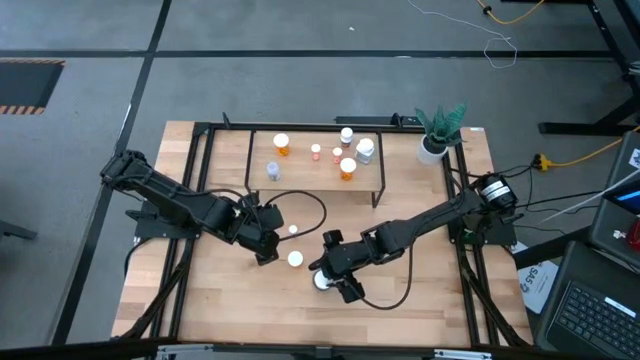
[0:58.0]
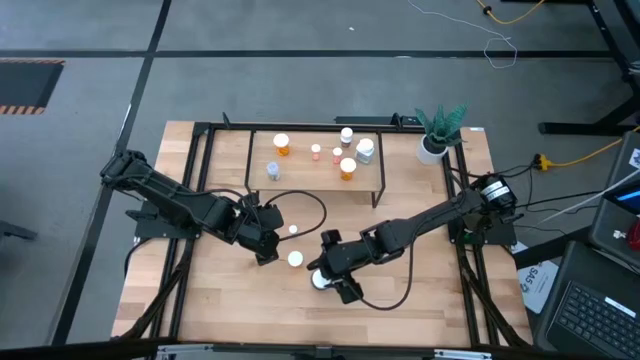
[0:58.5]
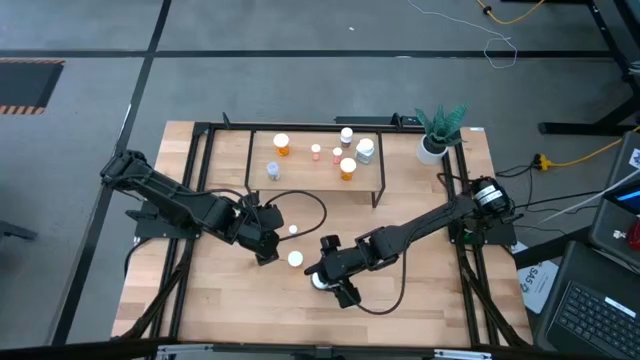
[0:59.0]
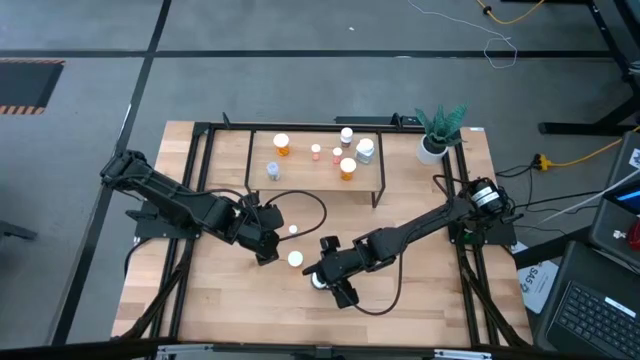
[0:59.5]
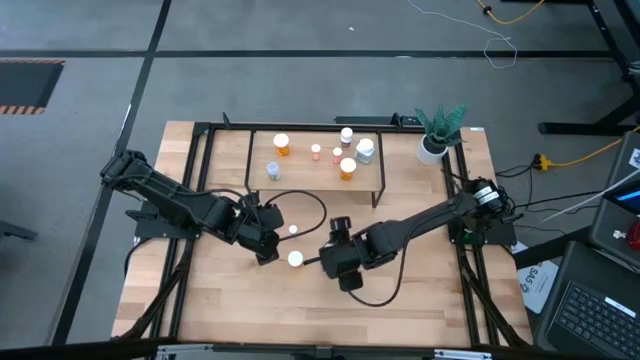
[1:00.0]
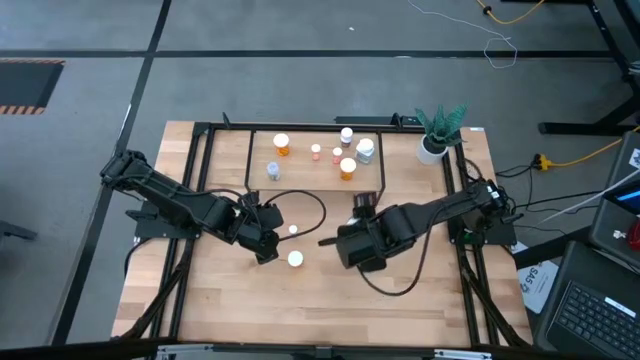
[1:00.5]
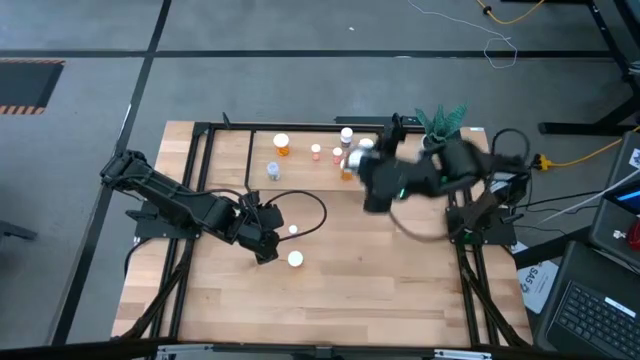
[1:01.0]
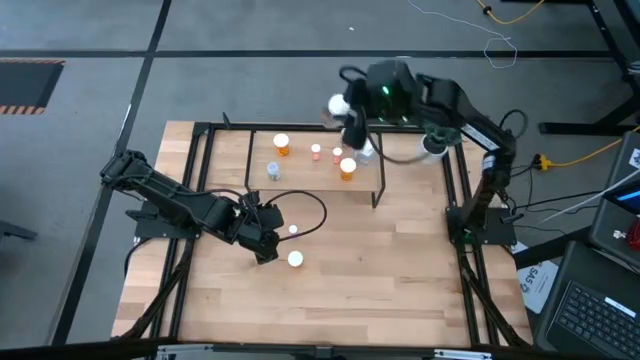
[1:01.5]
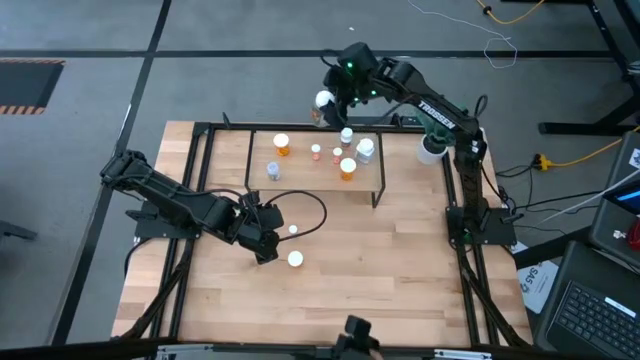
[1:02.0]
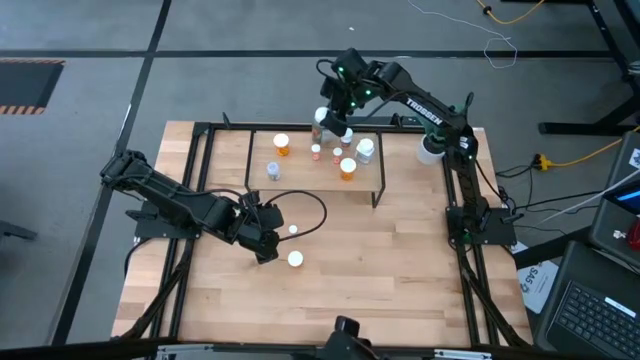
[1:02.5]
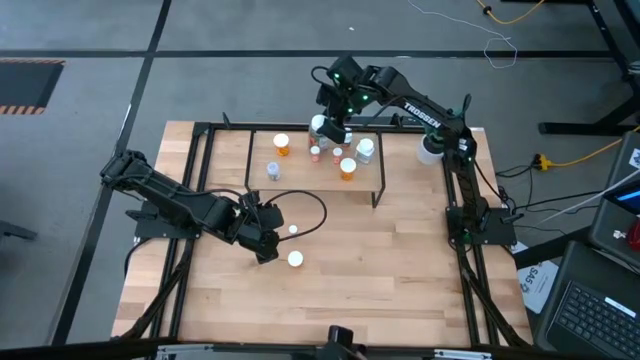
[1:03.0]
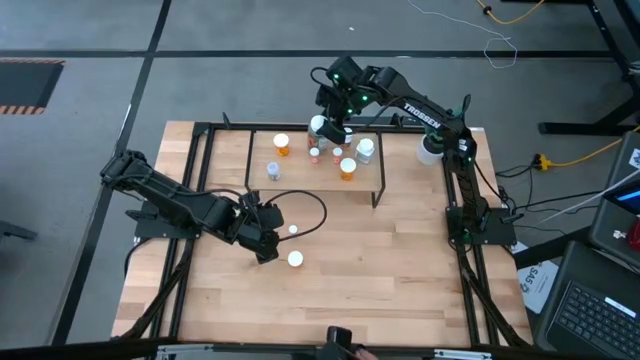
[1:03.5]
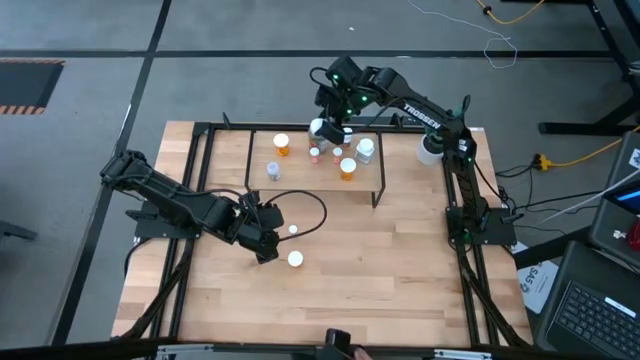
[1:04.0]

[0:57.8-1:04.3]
Task: Pick and place medicine bottles onto shelf by color
Put the green pill bottle on the shelf

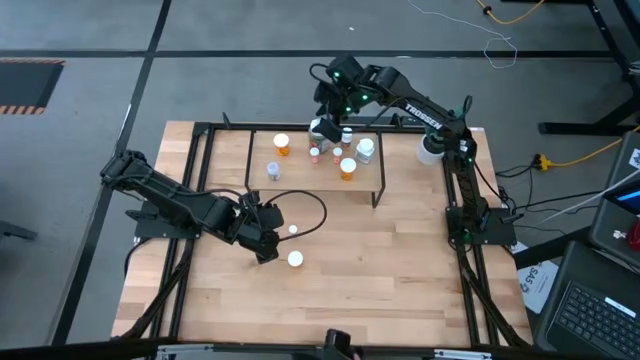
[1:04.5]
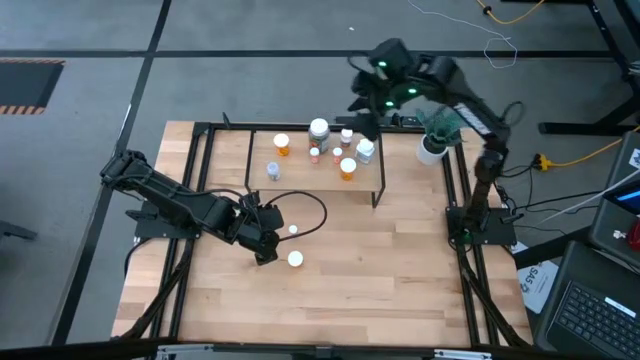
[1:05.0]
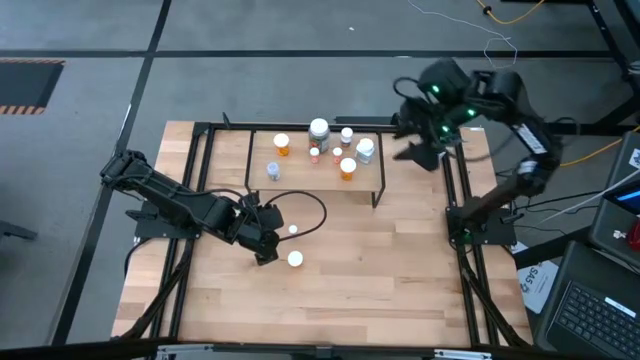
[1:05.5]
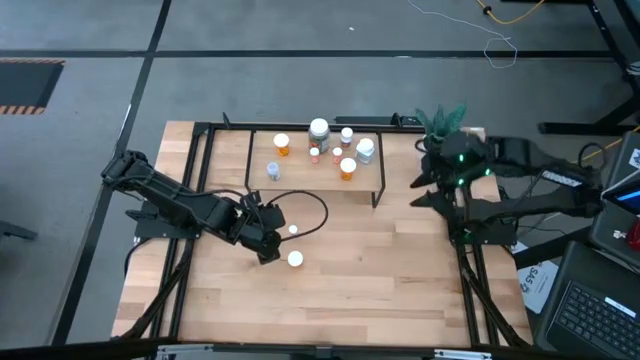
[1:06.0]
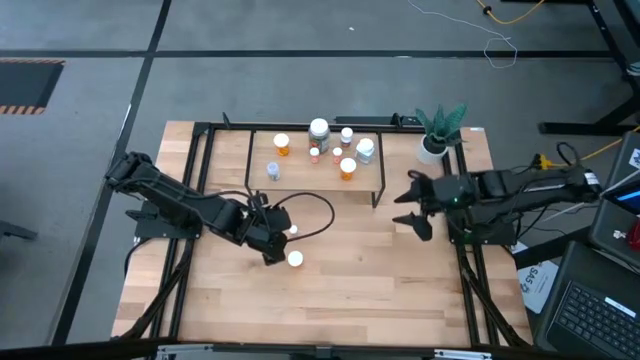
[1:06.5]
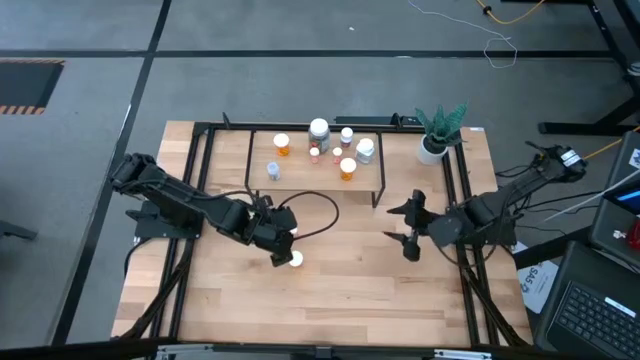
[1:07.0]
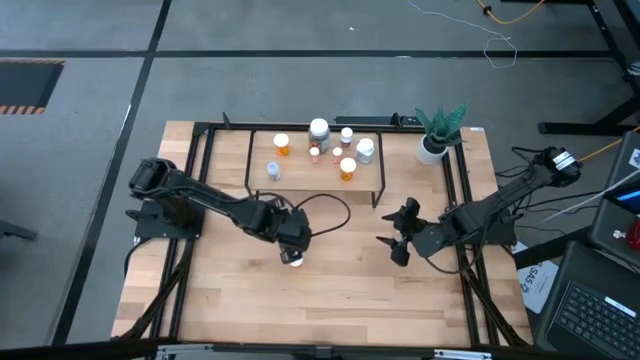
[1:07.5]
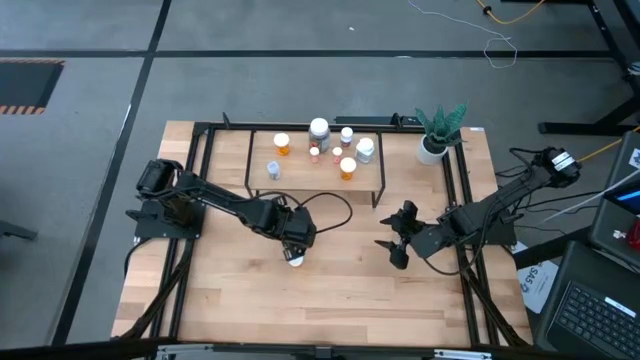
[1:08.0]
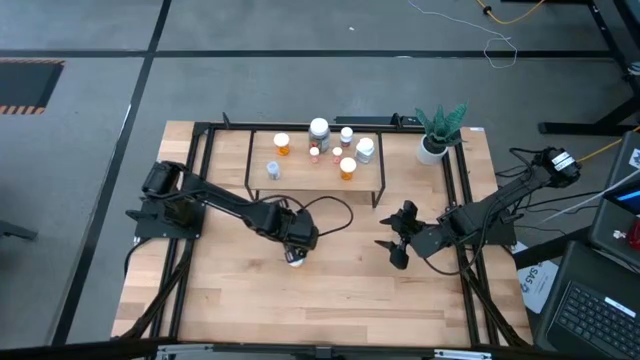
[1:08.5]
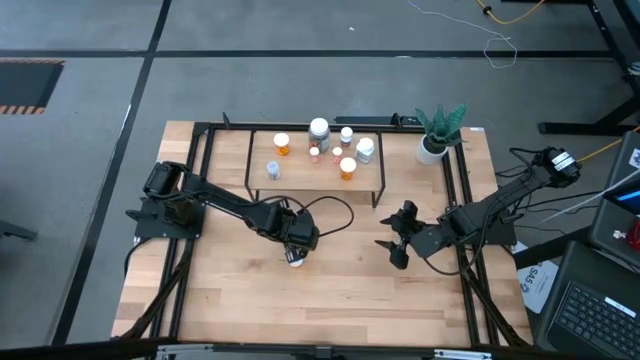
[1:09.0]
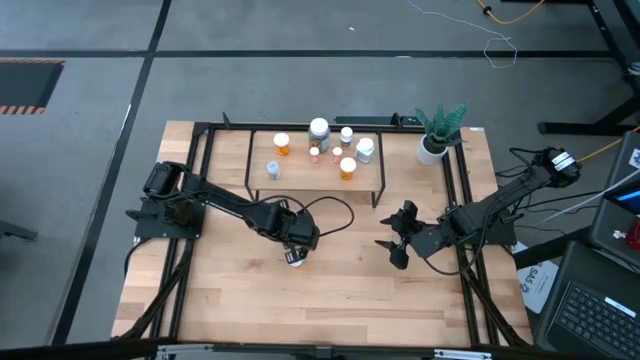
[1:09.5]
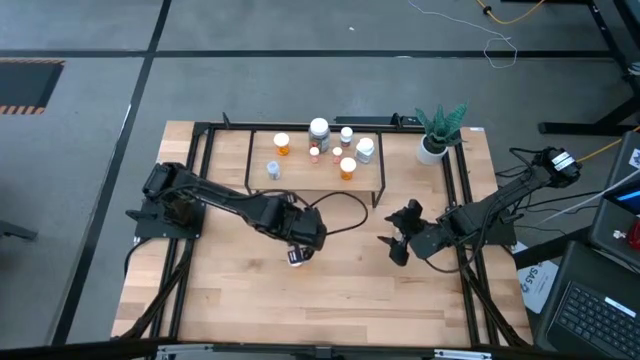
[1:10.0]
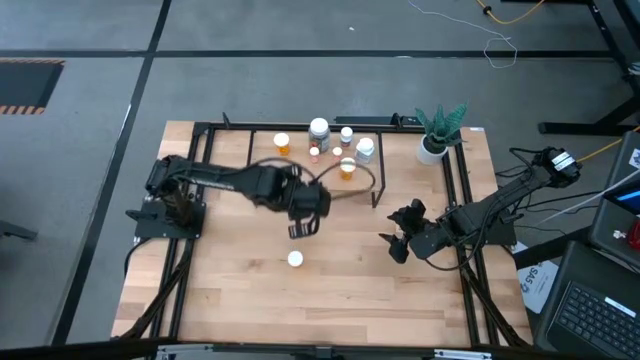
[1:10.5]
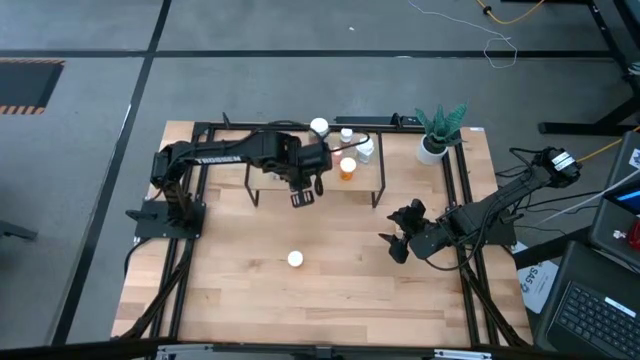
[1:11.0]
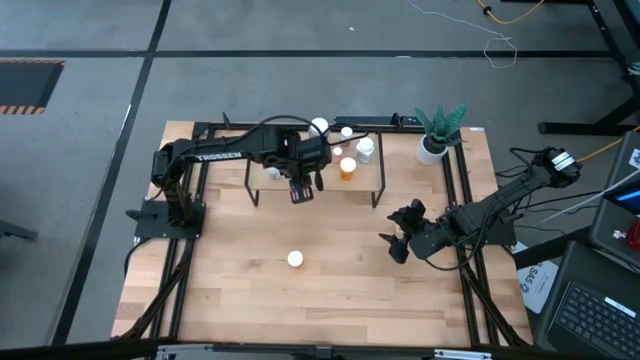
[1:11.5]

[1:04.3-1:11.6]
Put the pink pill bottle on the shelf

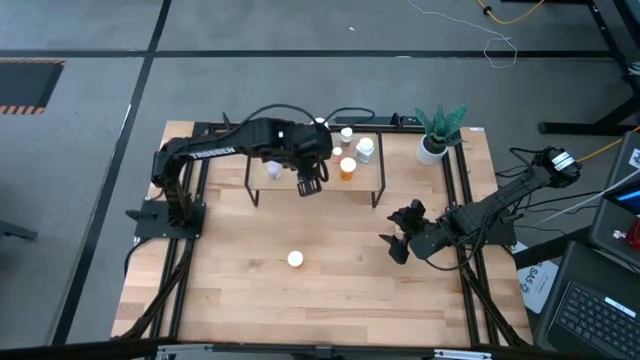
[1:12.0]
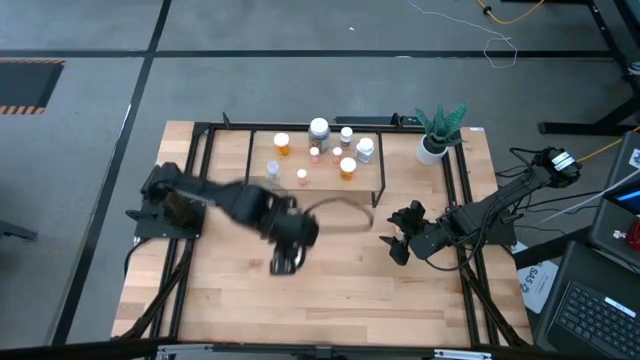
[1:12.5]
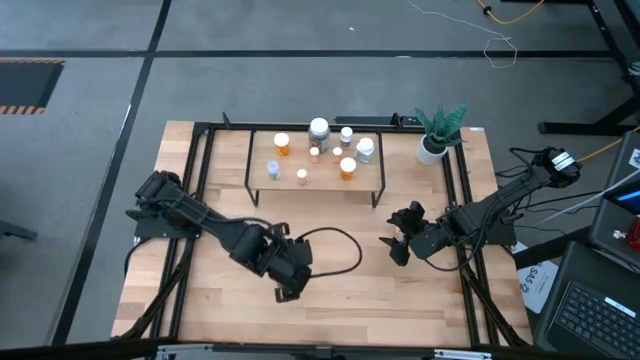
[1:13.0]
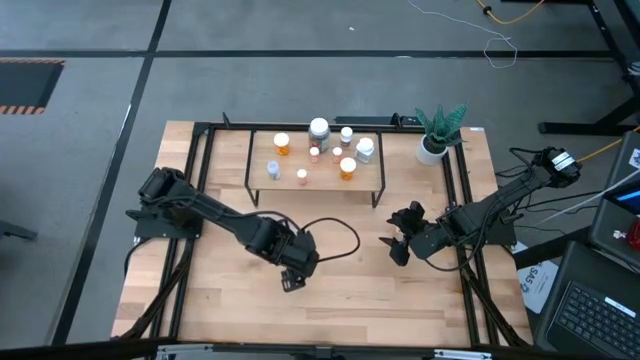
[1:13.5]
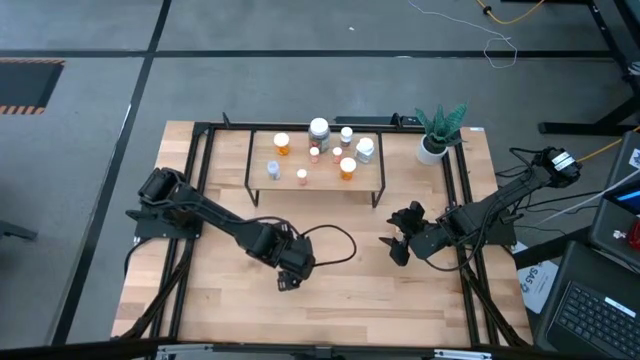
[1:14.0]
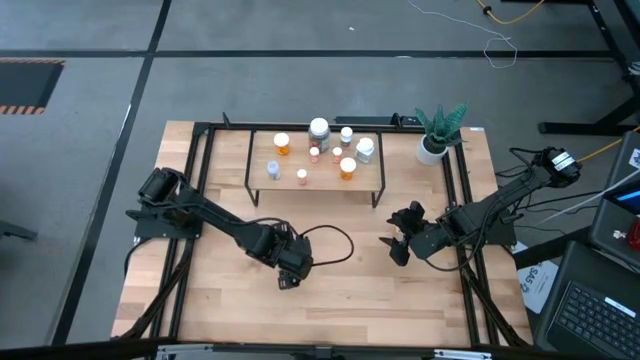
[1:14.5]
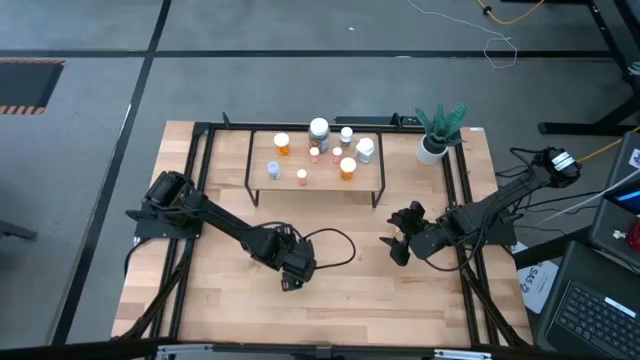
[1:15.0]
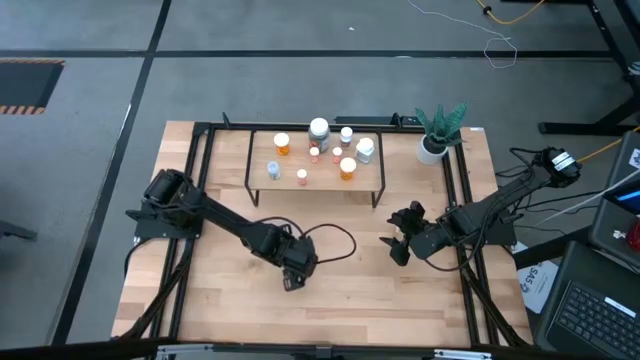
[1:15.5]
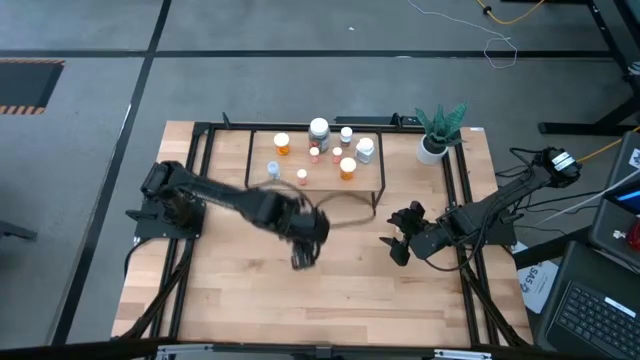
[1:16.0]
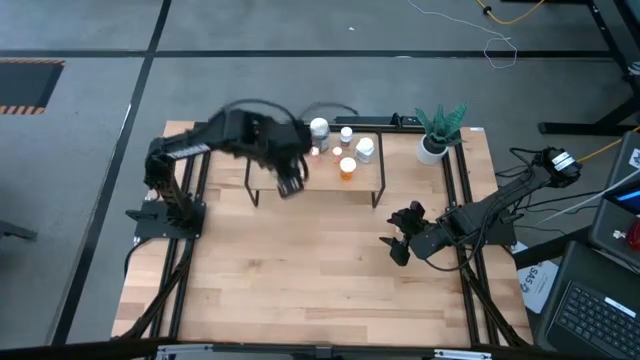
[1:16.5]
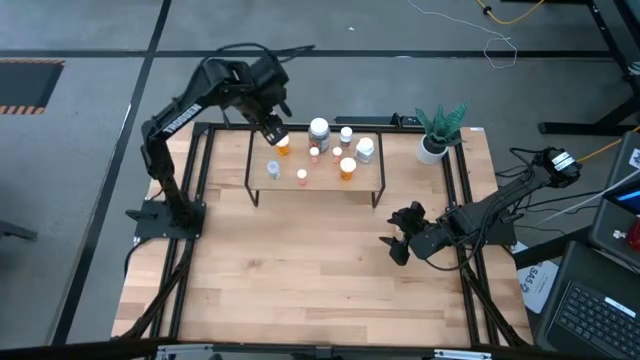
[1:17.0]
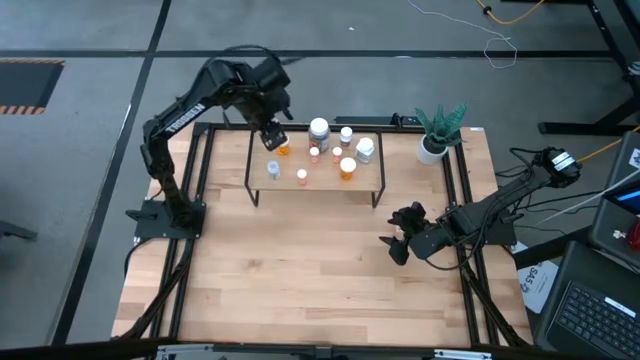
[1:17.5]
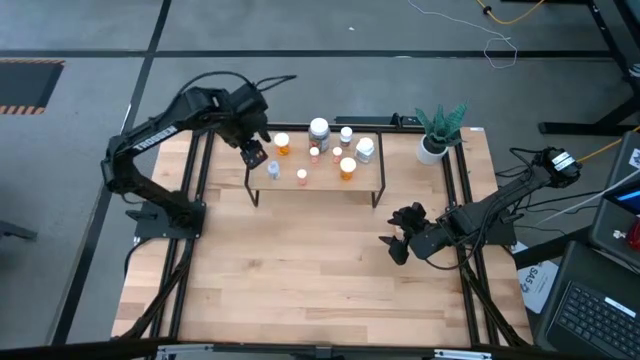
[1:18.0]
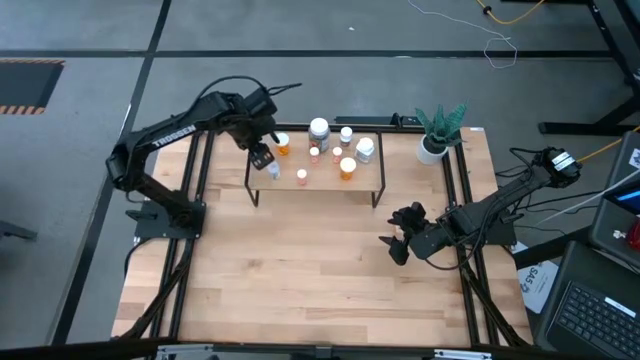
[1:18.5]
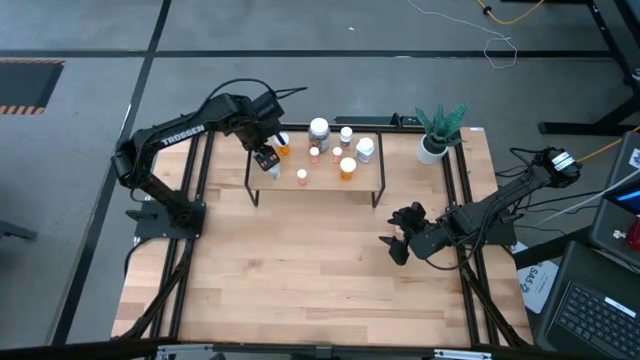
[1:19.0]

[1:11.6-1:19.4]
Put the orange pill bottle on the shelf
